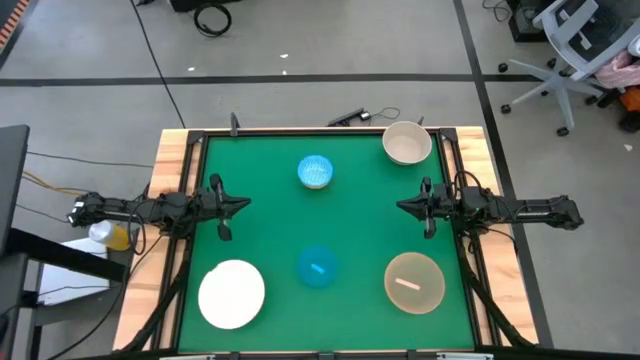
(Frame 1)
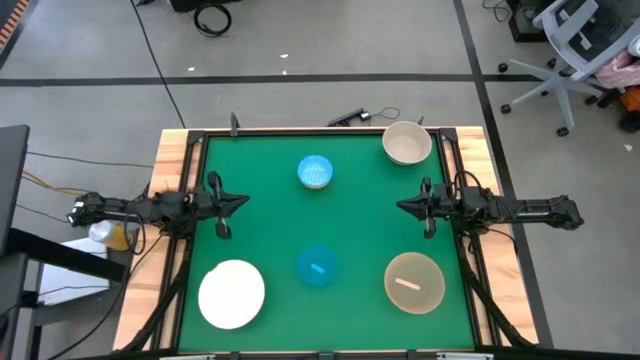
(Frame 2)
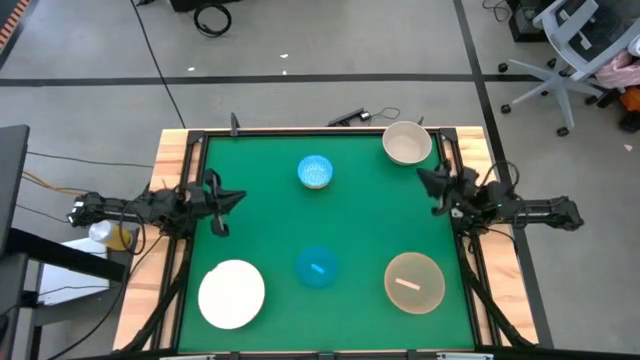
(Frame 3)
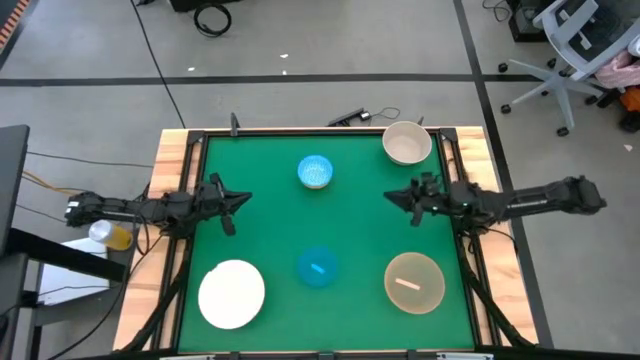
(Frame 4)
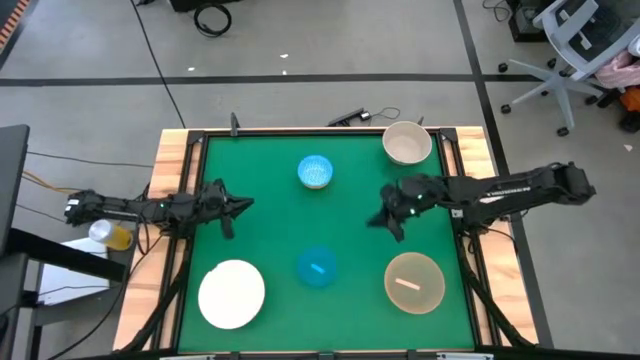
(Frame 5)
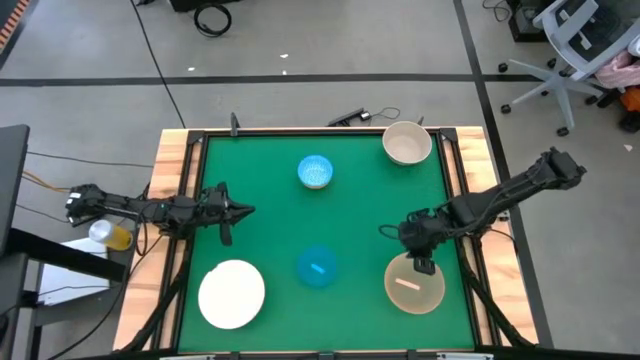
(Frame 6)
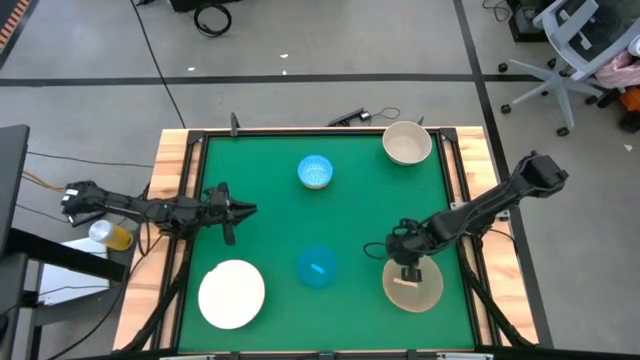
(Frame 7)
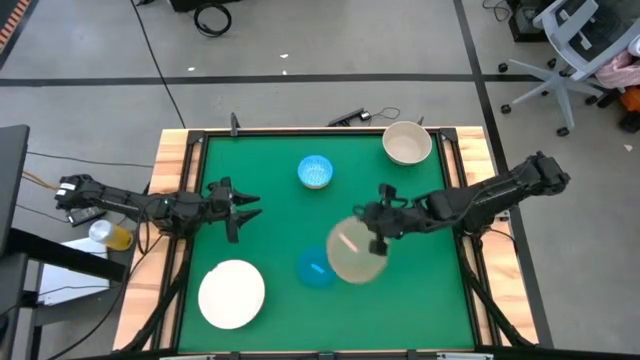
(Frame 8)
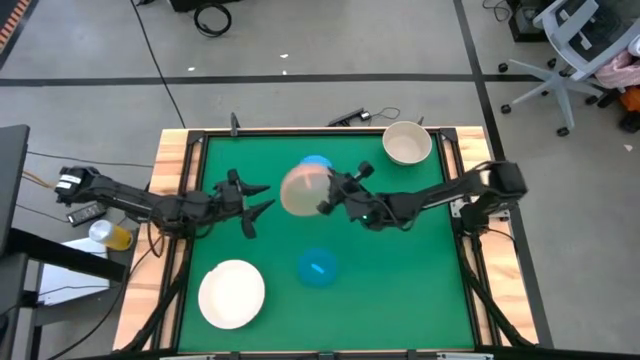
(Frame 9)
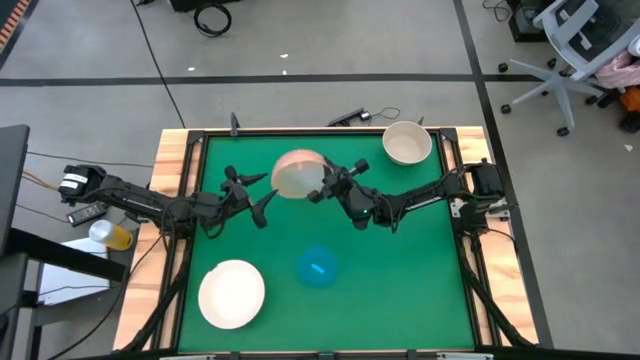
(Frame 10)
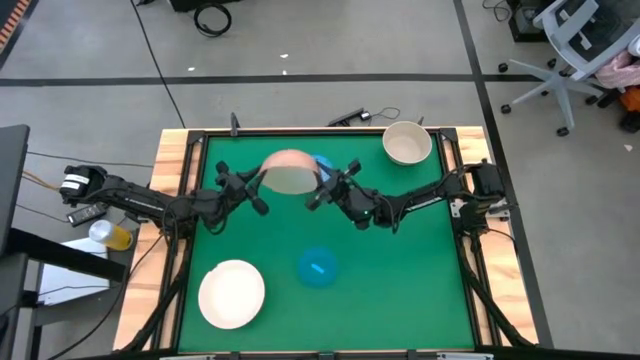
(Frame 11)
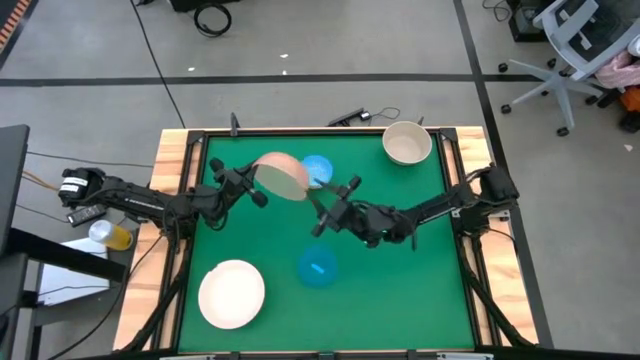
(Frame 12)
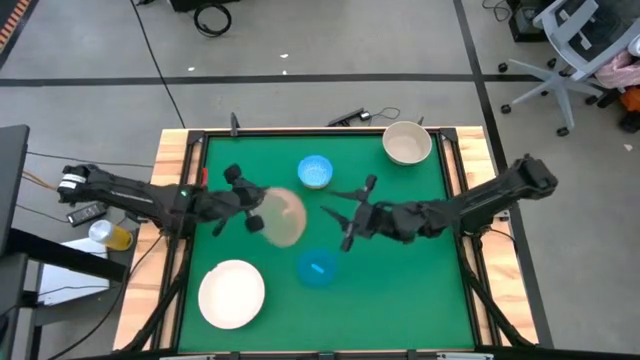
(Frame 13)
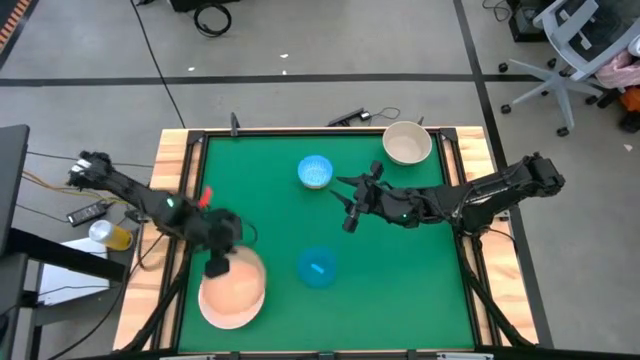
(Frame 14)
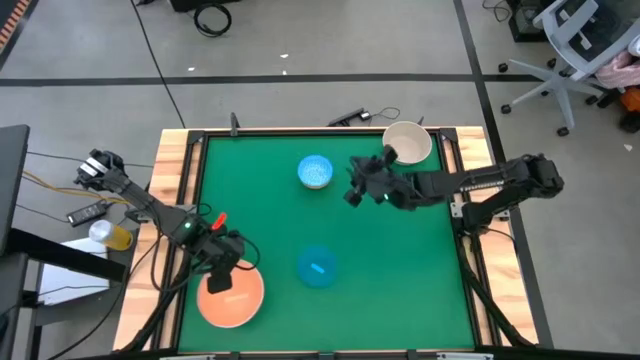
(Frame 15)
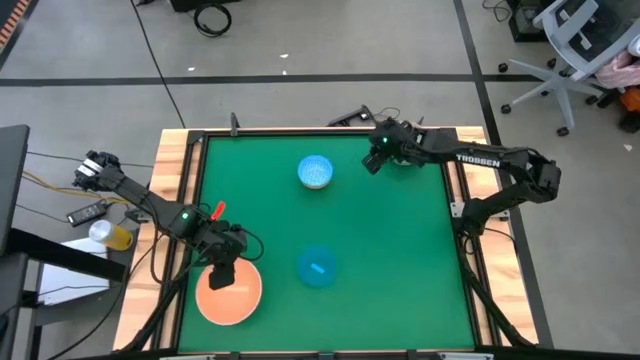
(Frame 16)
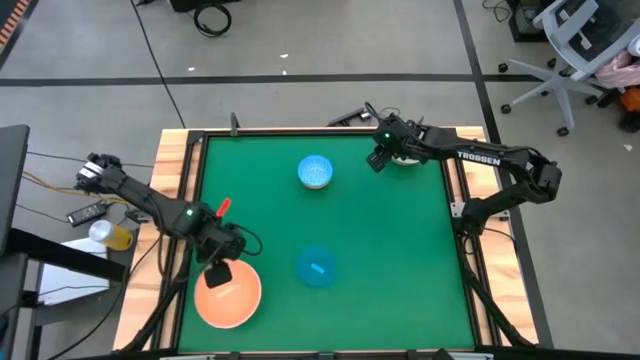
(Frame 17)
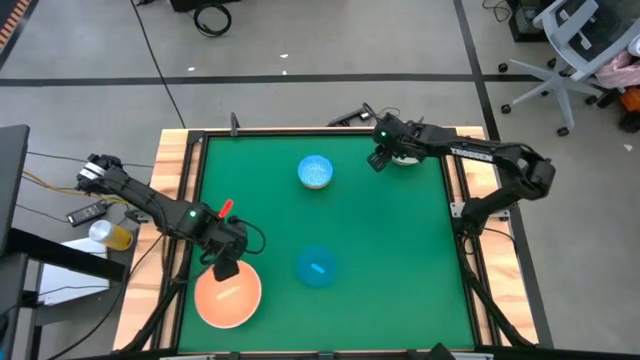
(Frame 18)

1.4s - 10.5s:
Stack the light orange bowl on top of the white bowl

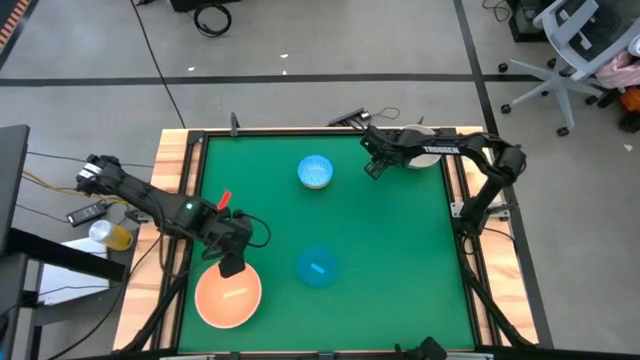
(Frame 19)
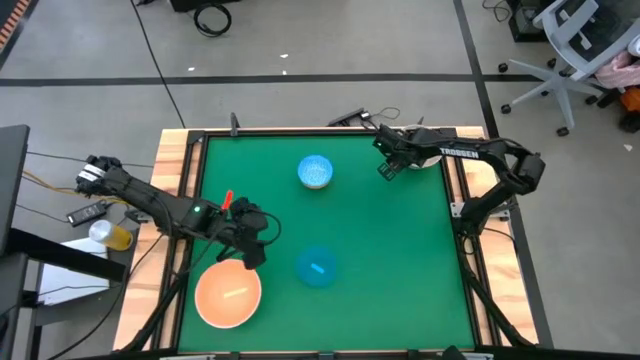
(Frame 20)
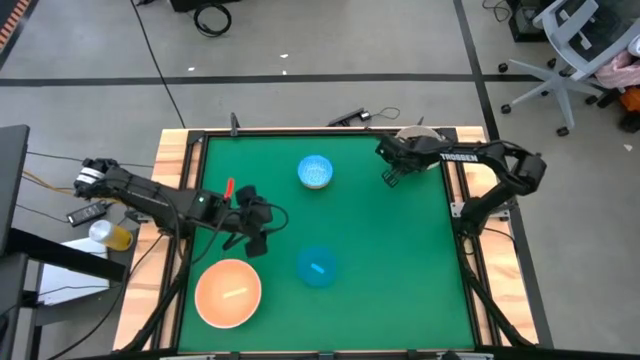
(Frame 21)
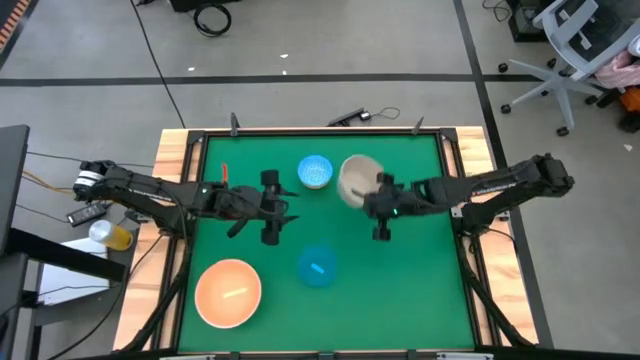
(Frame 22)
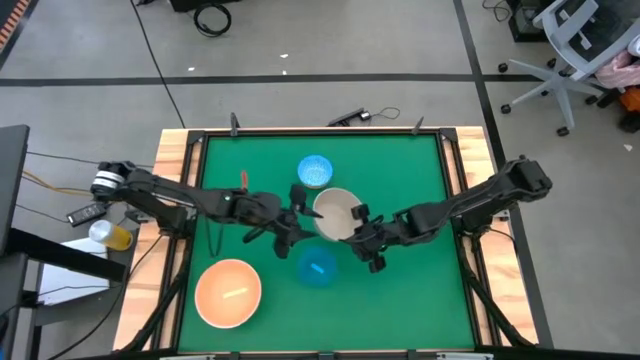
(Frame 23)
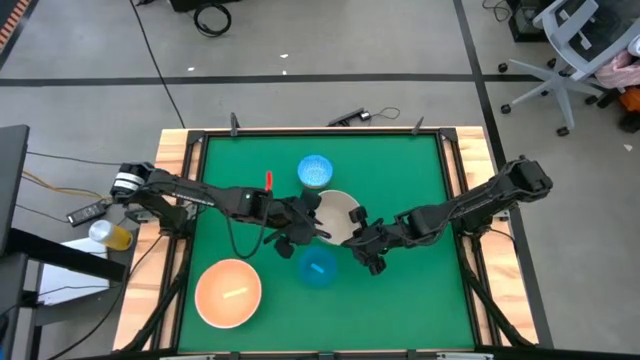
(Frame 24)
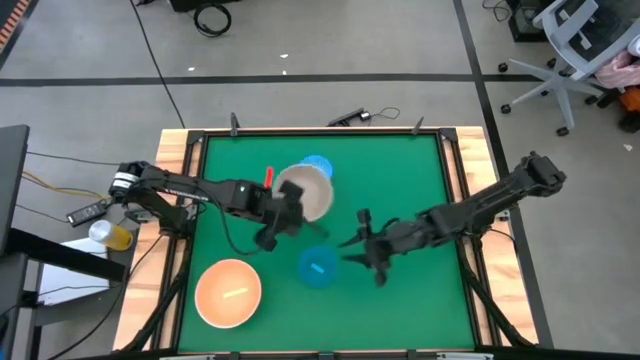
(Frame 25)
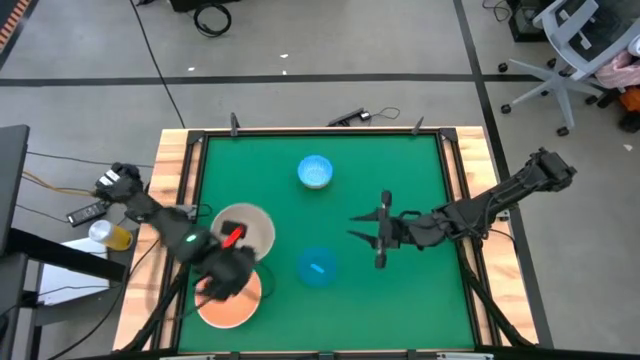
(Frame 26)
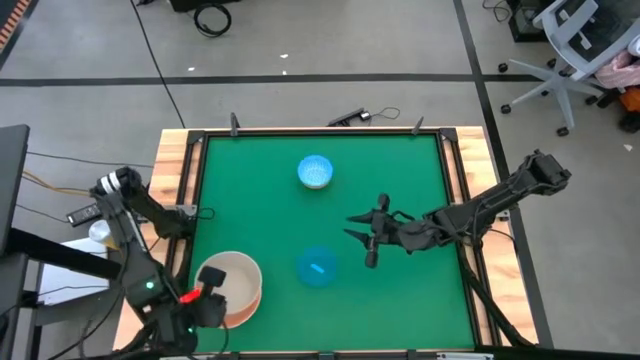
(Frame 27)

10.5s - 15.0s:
Stack the gray bowl on top of the light orange bowl

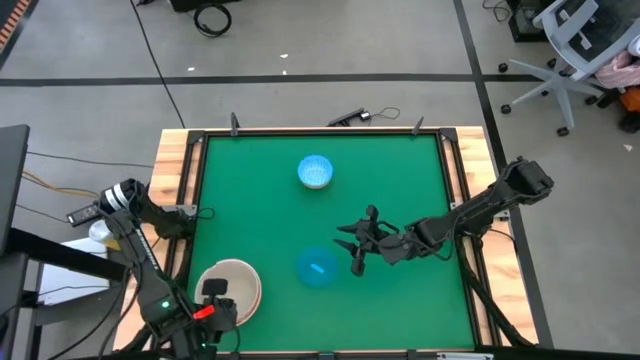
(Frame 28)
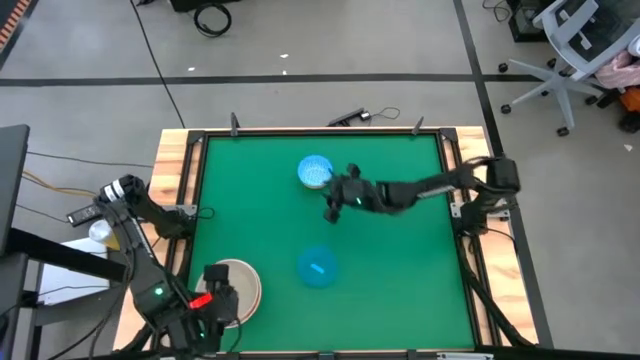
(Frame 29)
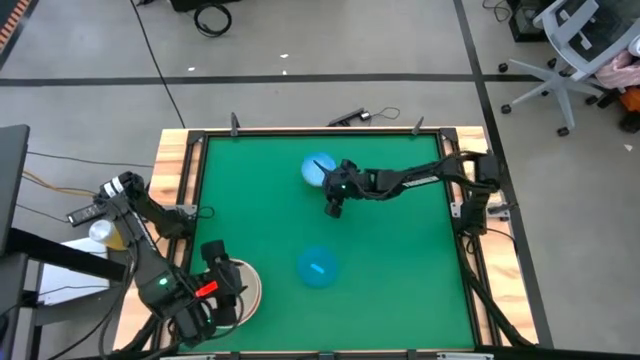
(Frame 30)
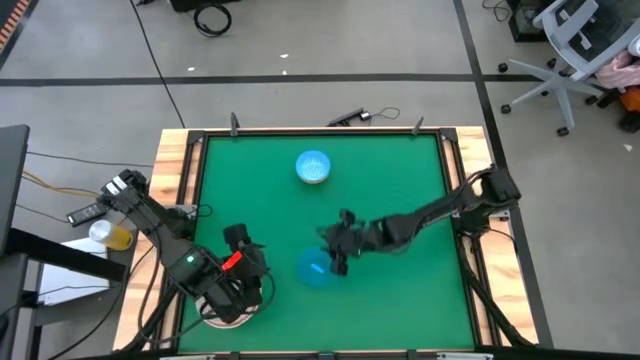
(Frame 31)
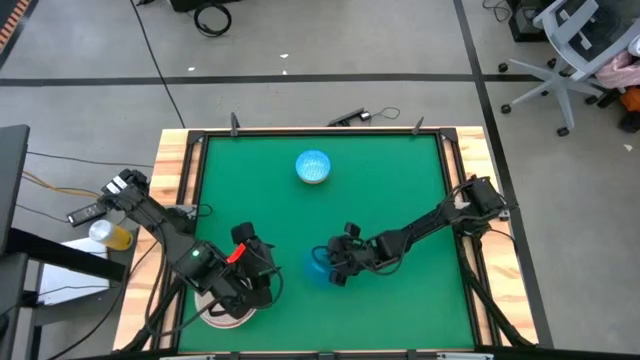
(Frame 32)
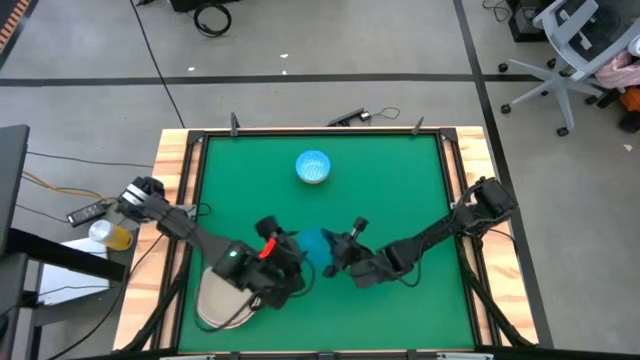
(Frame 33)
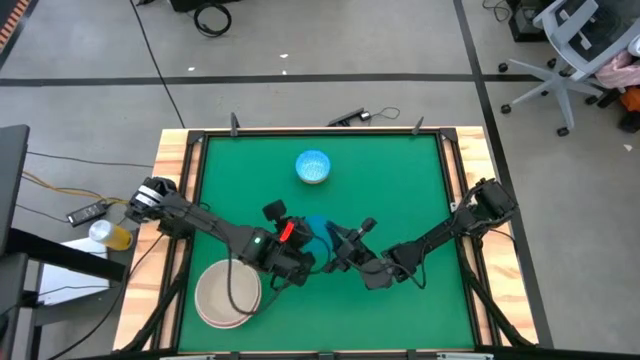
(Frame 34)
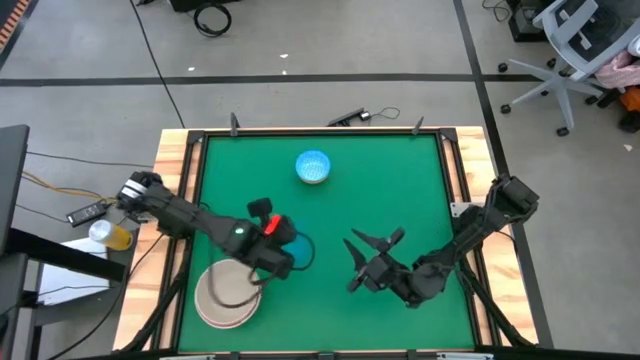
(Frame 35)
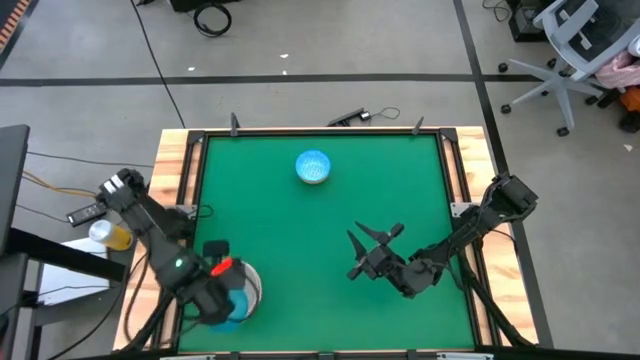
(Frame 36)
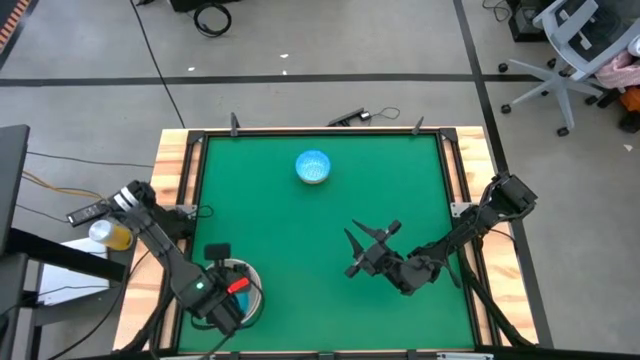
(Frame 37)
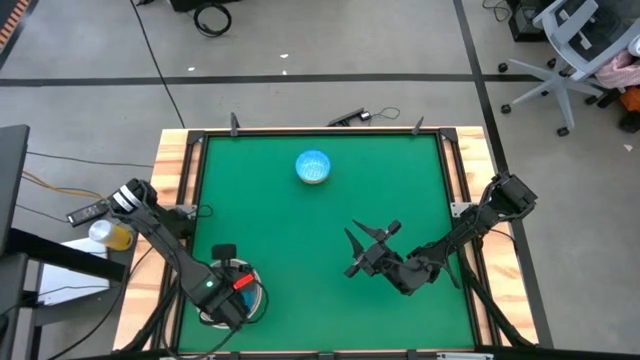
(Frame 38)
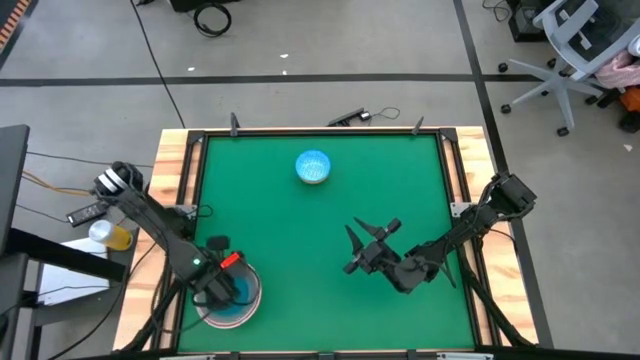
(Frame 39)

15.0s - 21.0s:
Stack the blue bowl on top of the gray bowl

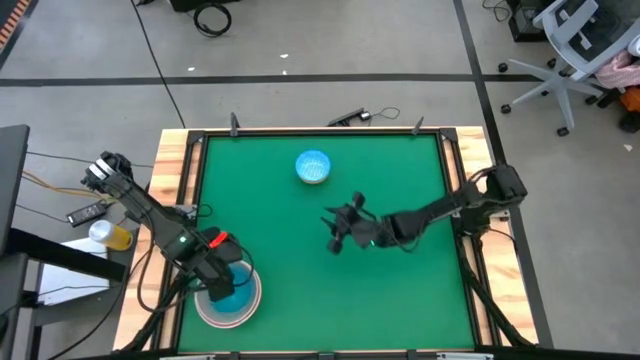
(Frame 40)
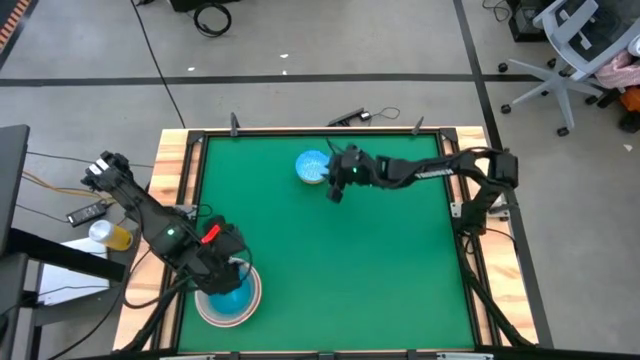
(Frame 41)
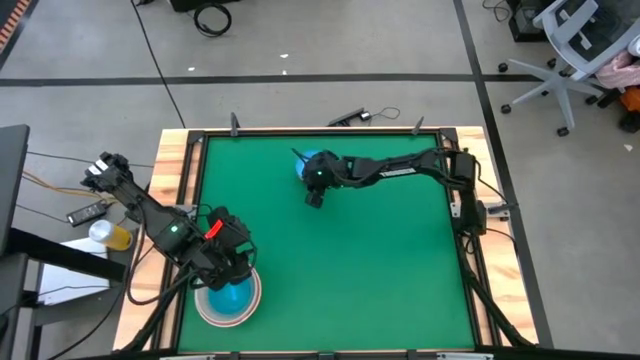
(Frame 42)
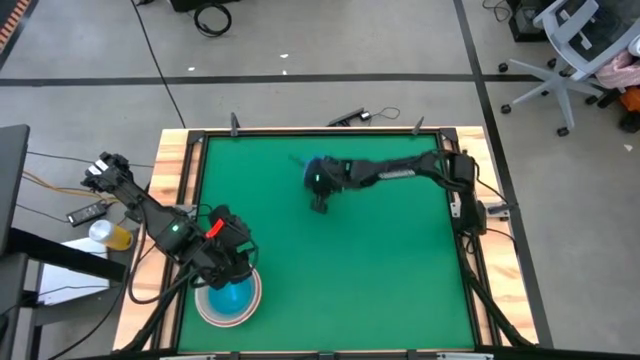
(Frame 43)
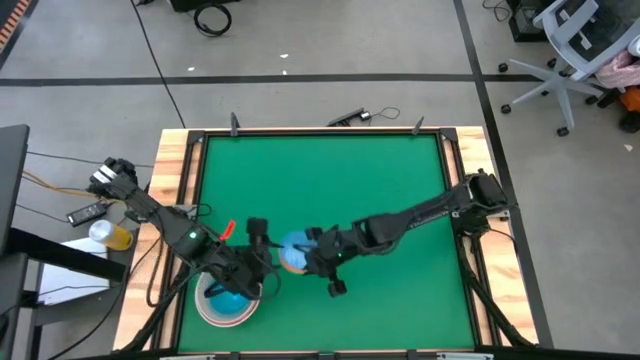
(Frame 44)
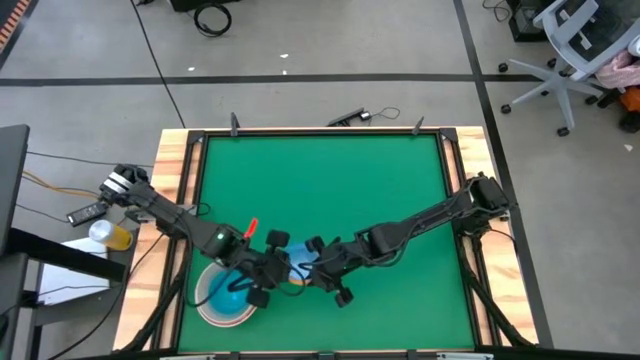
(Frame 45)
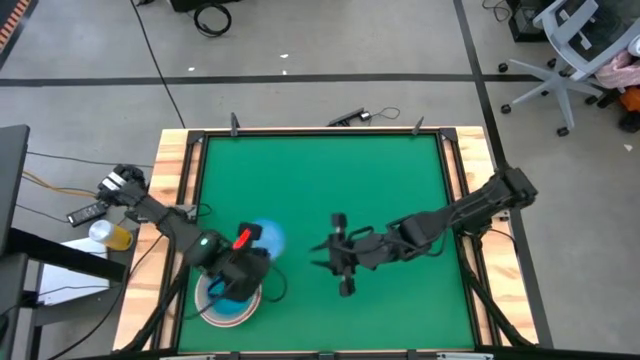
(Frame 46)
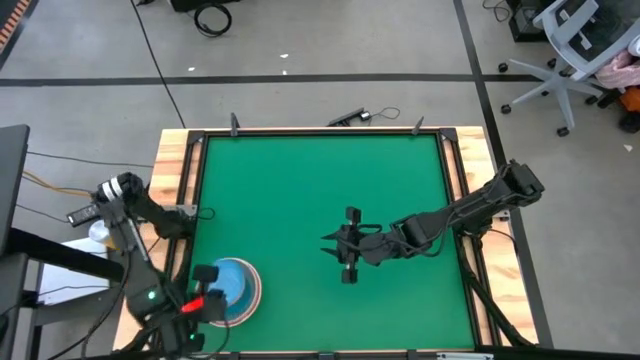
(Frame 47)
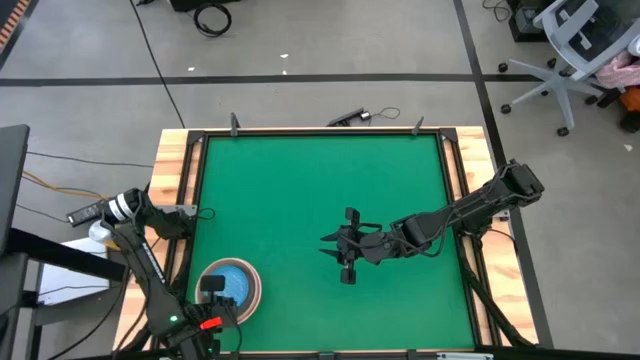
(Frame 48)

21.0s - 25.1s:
Stack the blue patterned bowl on top of the blue bowl
